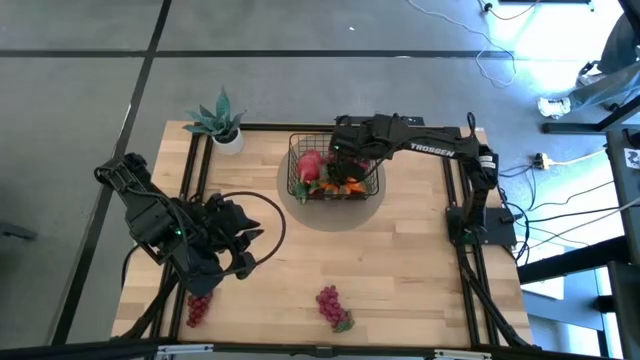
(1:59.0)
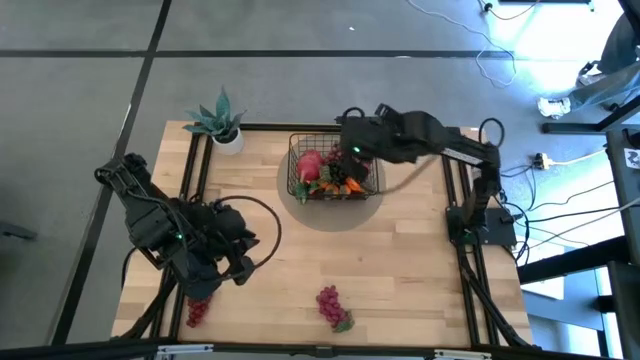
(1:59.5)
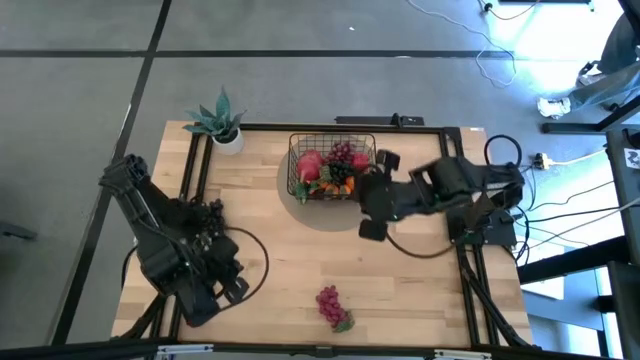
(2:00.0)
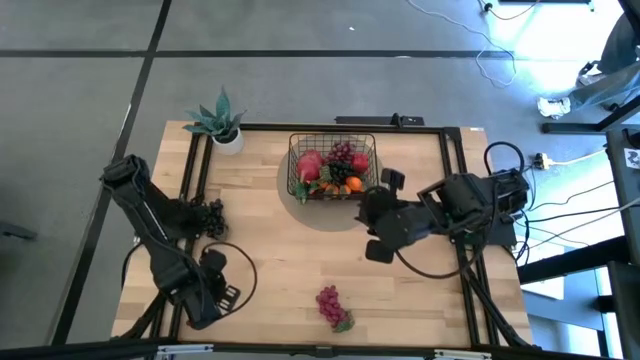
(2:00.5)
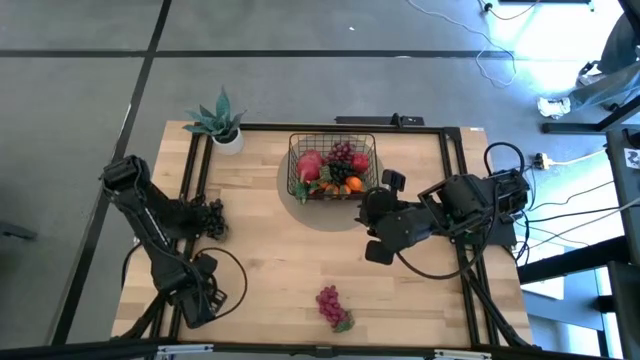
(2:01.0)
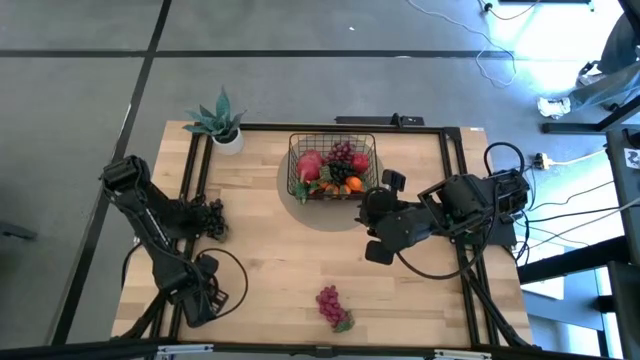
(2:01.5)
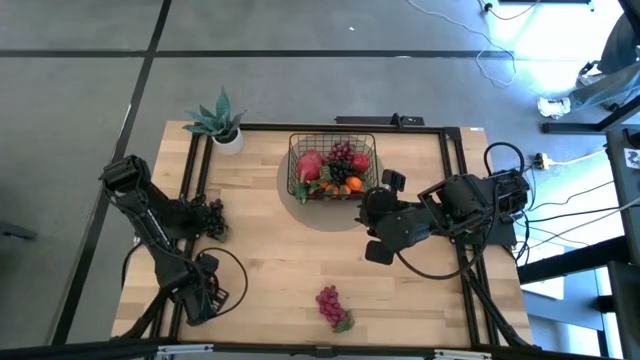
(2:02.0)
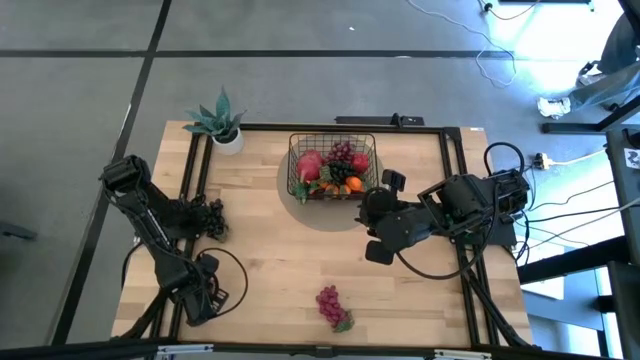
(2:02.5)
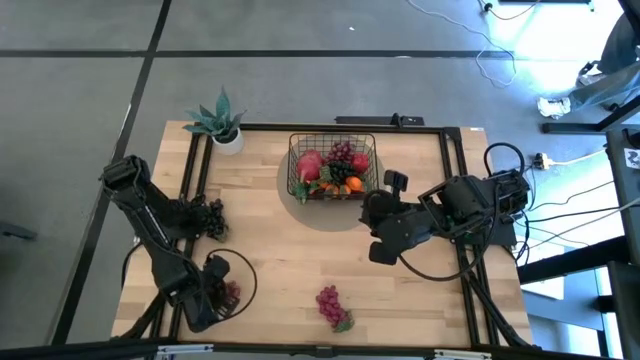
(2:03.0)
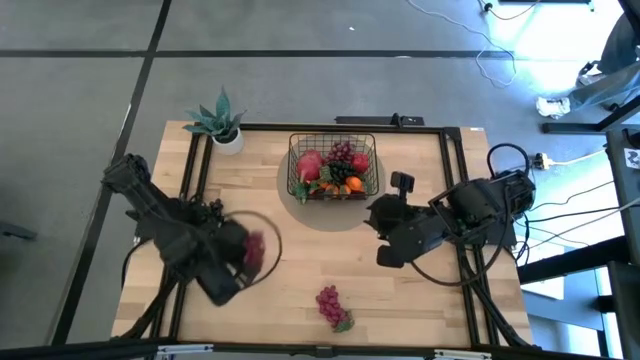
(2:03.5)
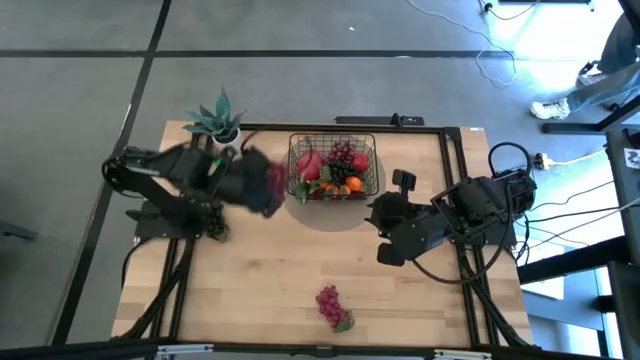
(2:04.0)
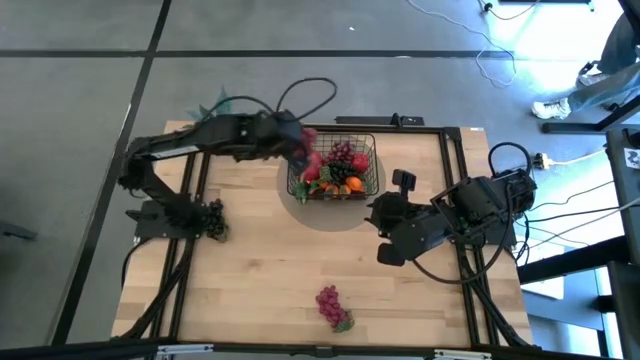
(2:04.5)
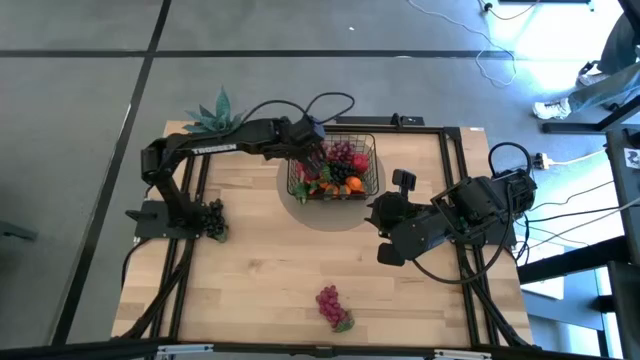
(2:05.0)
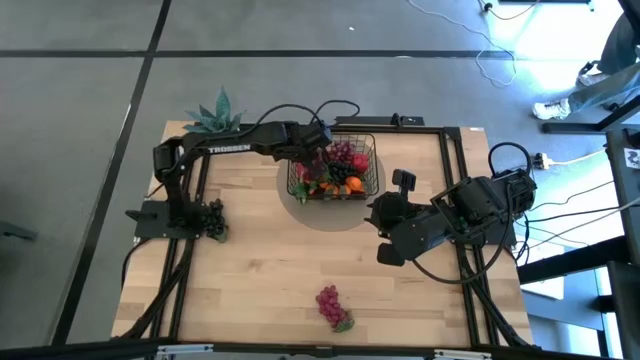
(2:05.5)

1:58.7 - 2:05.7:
Task: Build produce basket
Put the left purple grapes into the black wire basket

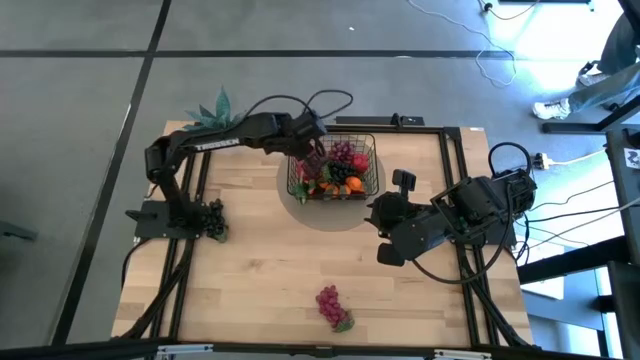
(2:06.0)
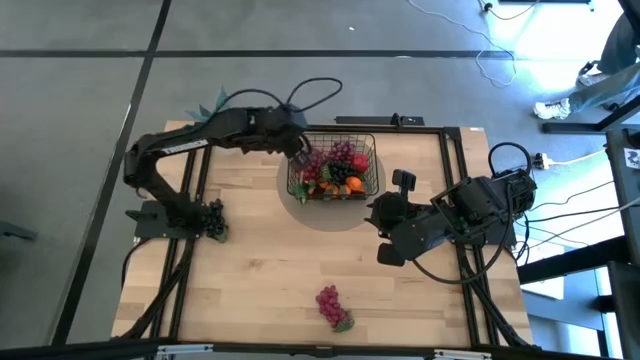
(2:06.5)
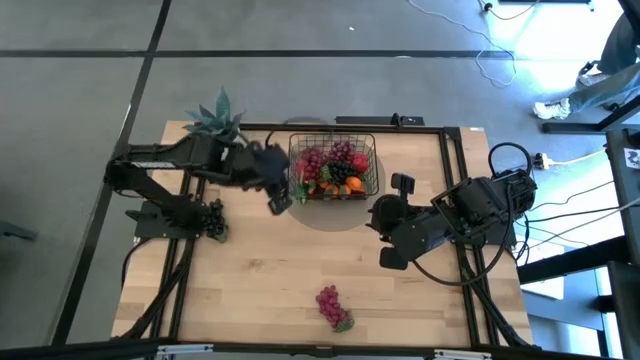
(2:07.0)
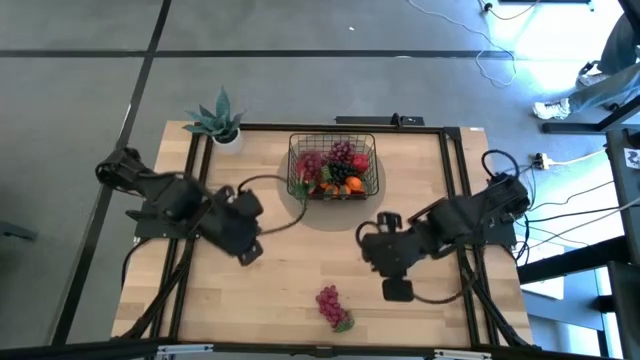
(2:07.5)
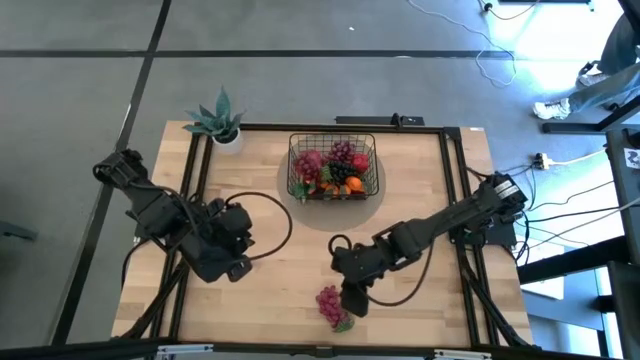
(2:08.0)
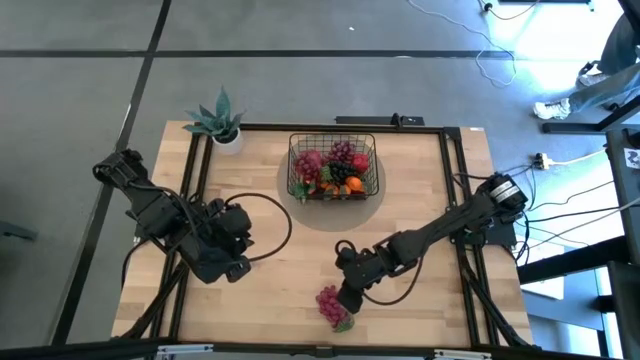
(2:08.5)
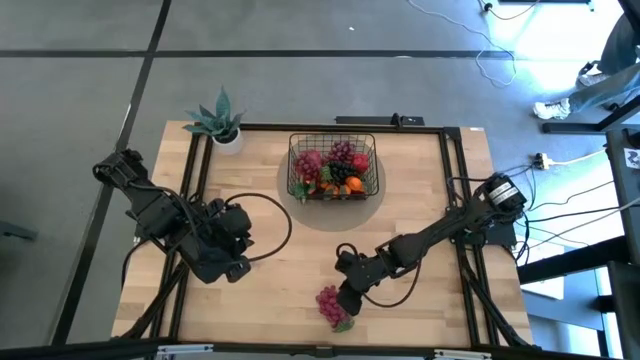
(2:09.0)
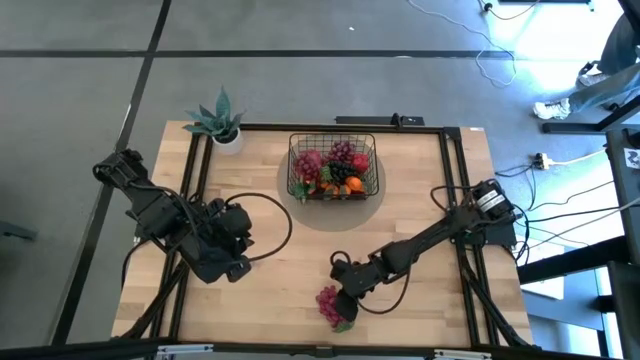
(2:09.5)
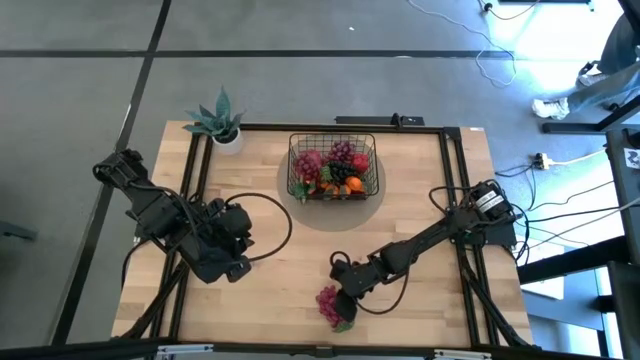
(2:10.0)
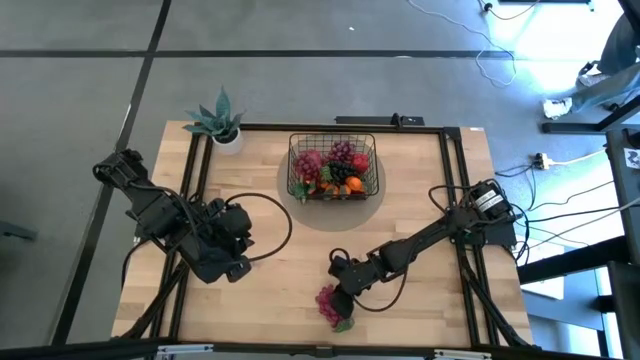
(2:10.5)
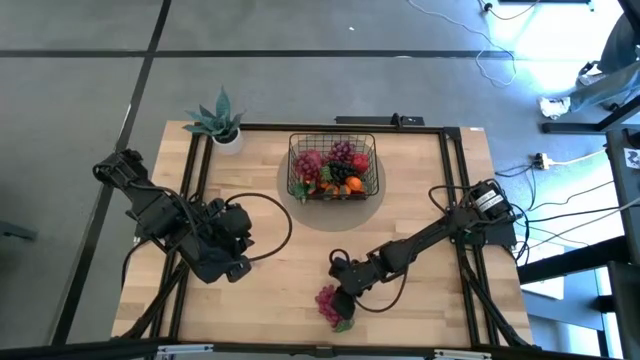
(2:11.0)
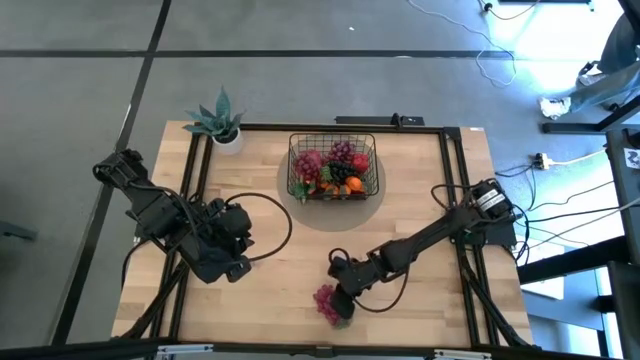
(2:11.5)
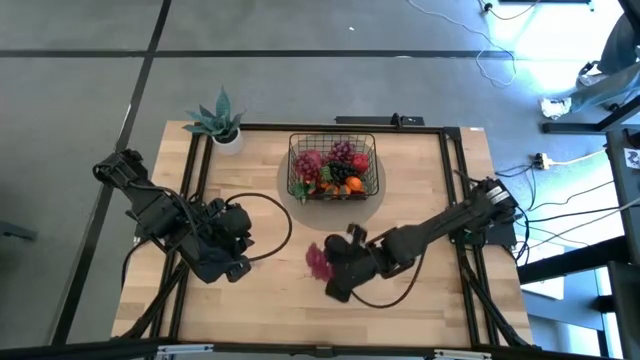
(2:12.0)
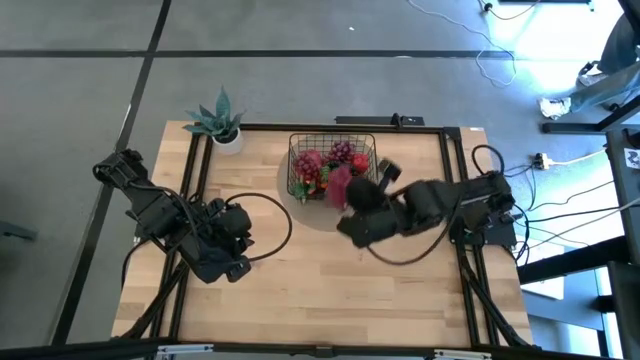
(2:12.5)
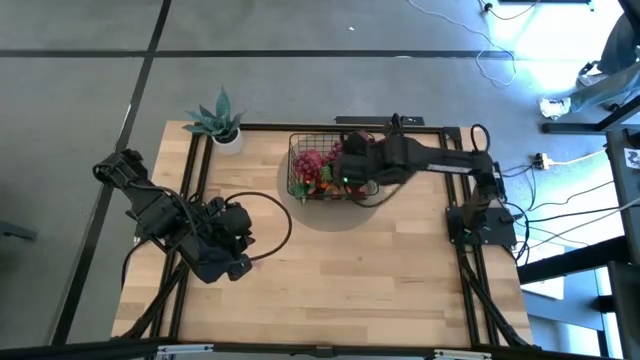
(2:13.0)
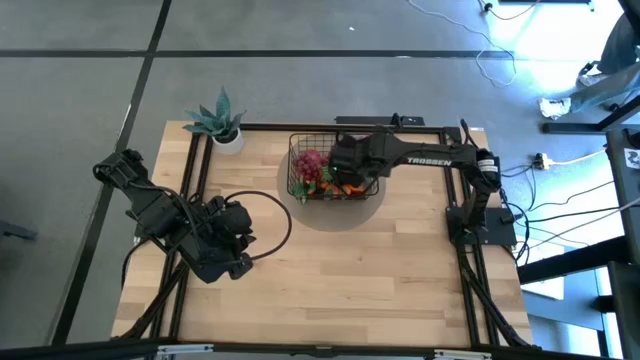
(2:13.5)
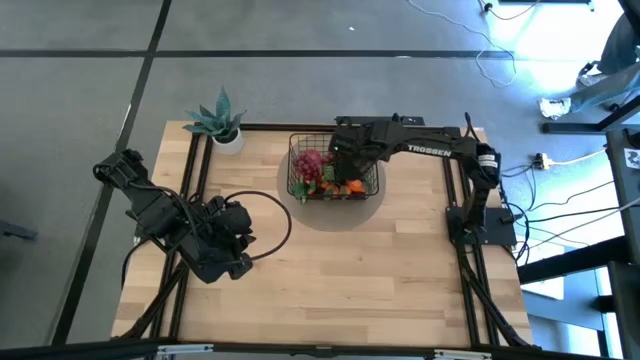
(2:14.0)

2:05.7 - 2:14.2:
Put the purple grapes into the black wire basket

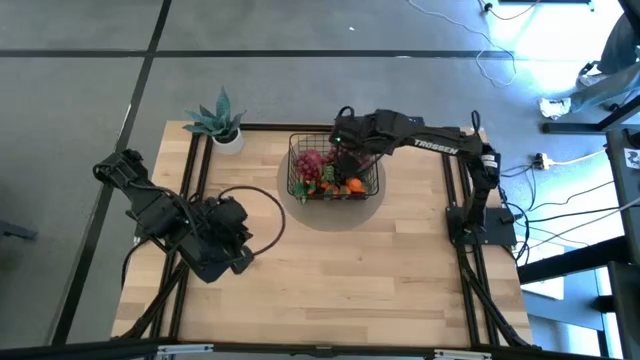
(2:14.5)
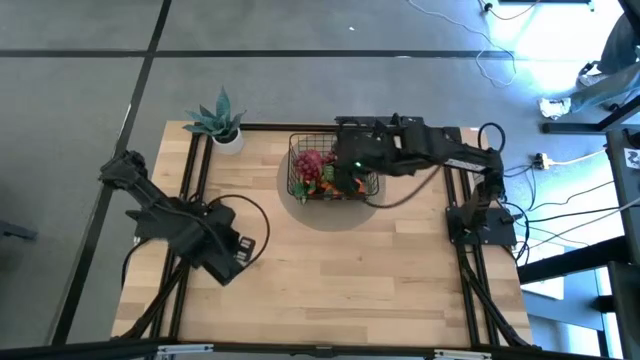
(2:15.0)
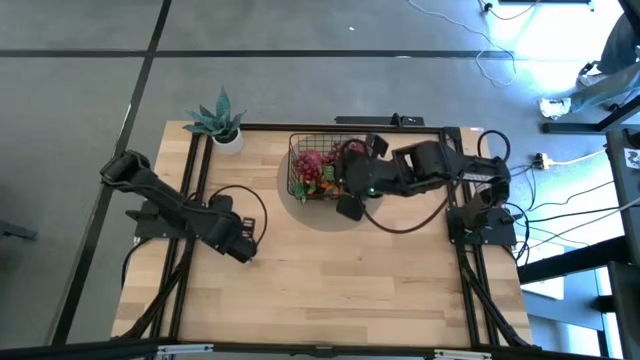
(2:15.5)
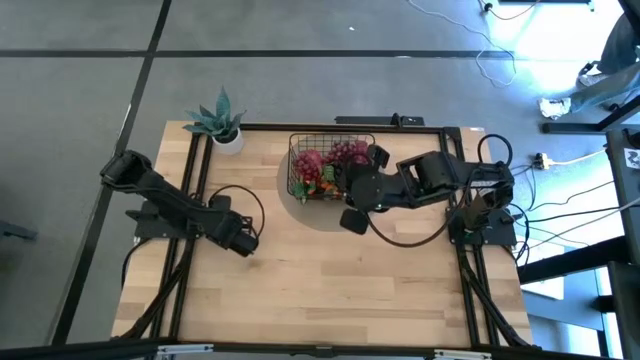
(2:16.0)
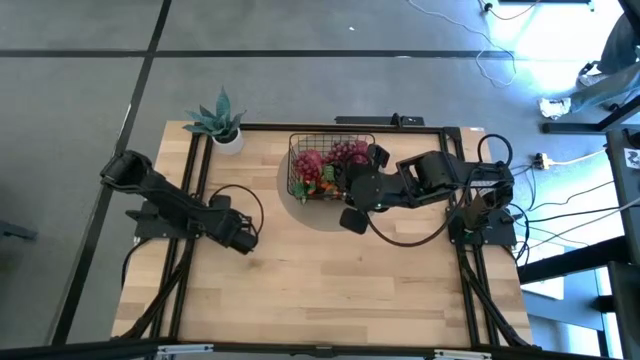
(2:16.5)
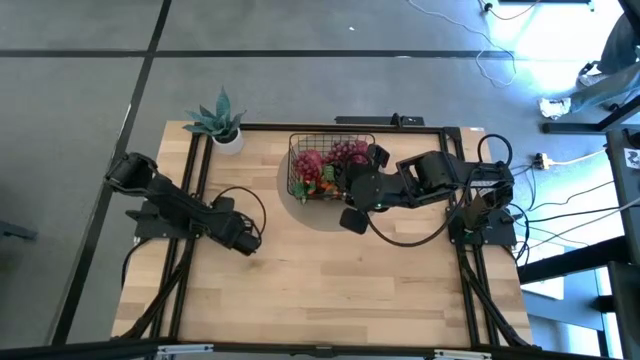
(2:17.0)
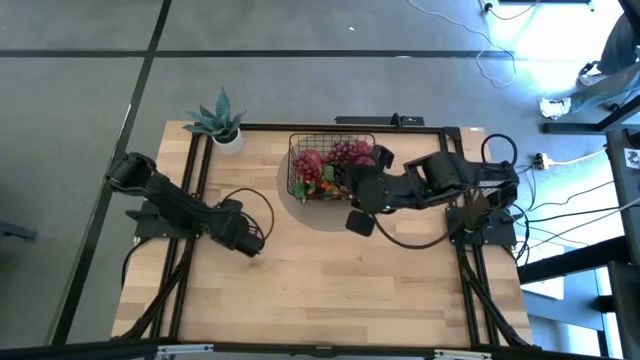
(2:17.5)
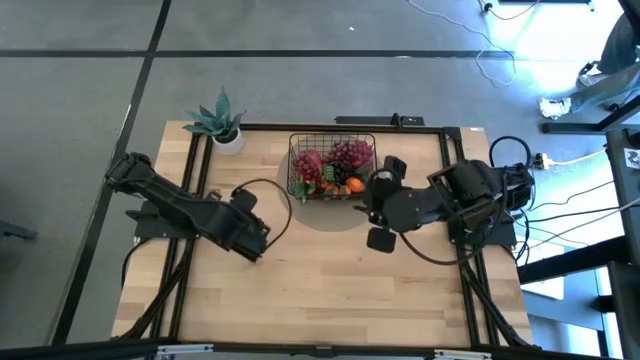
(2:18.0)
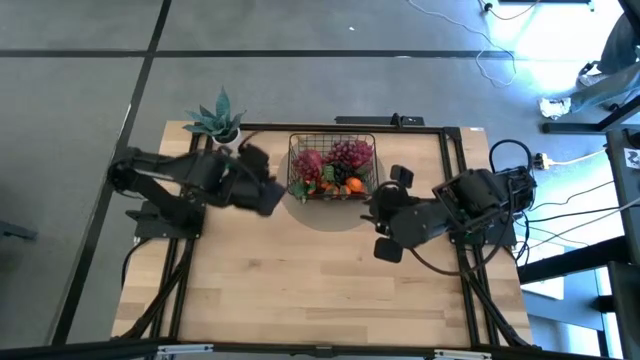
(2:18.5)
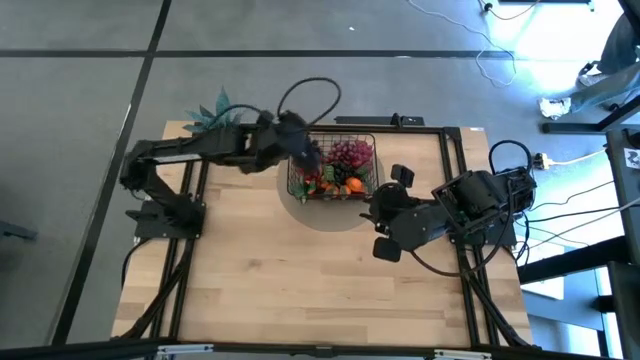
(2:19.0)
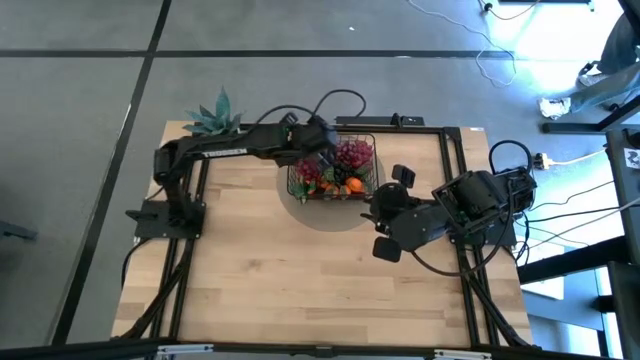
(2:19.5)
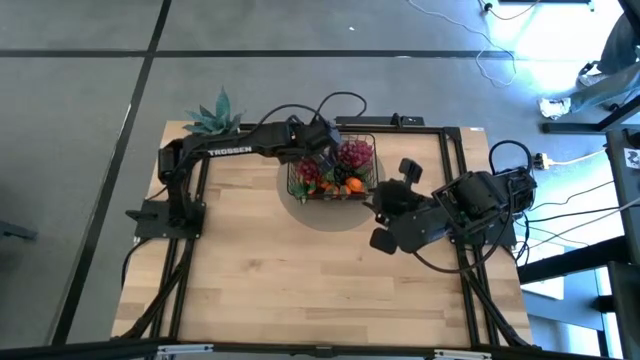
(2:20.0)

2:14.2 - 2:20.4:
Put the black grapes into the black wire basket
